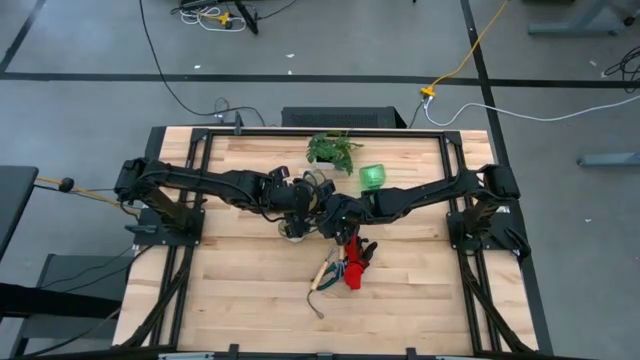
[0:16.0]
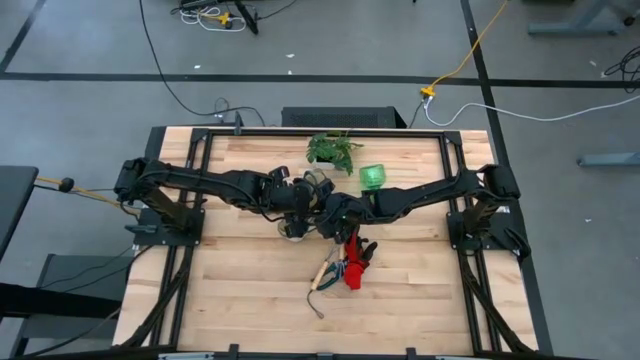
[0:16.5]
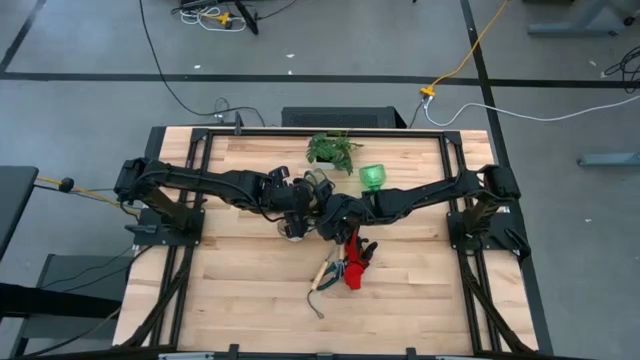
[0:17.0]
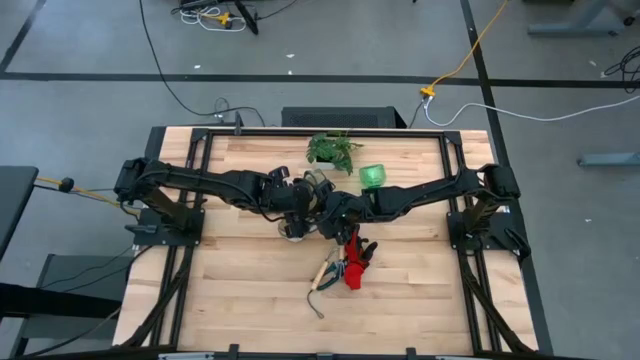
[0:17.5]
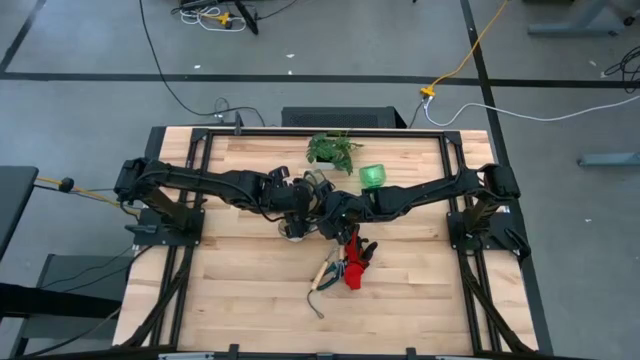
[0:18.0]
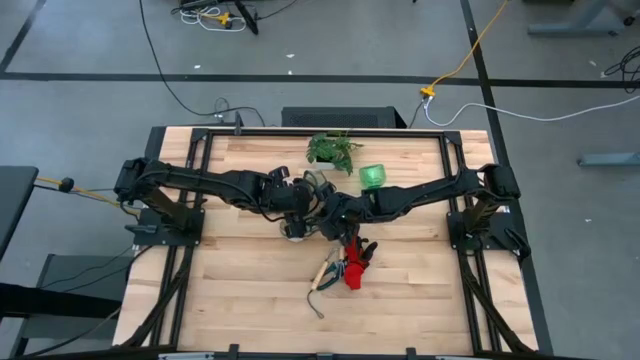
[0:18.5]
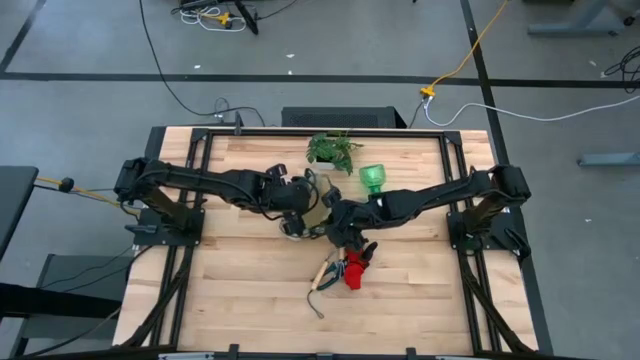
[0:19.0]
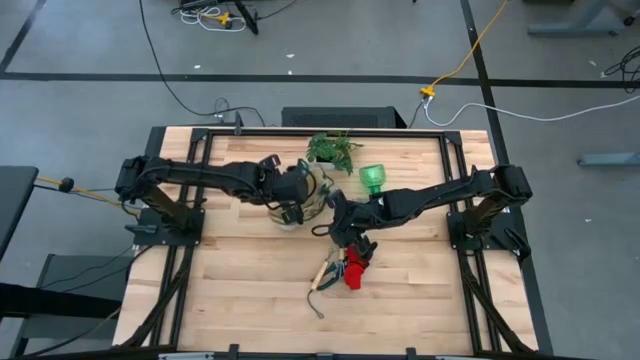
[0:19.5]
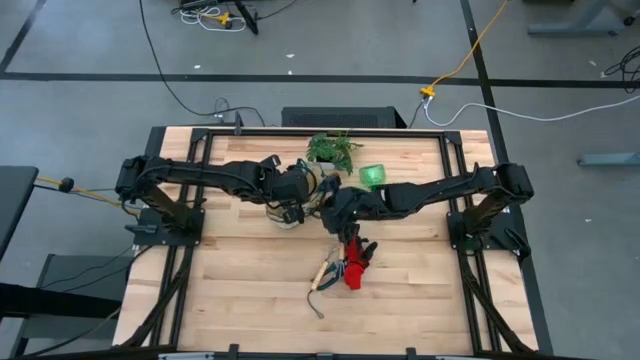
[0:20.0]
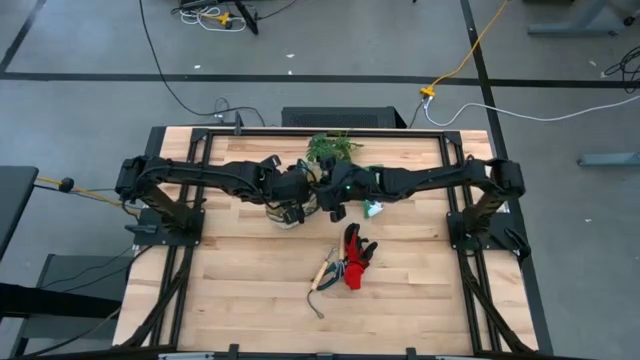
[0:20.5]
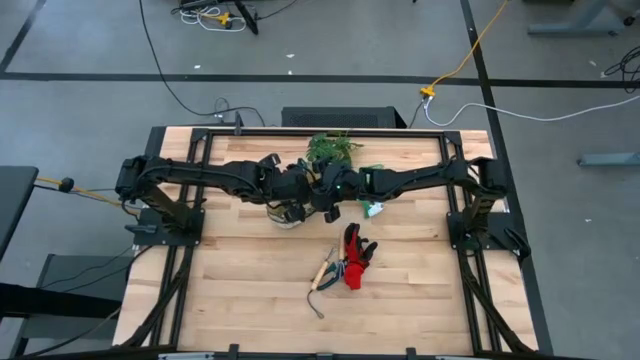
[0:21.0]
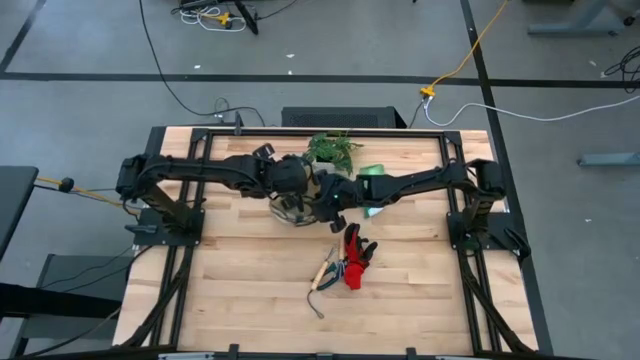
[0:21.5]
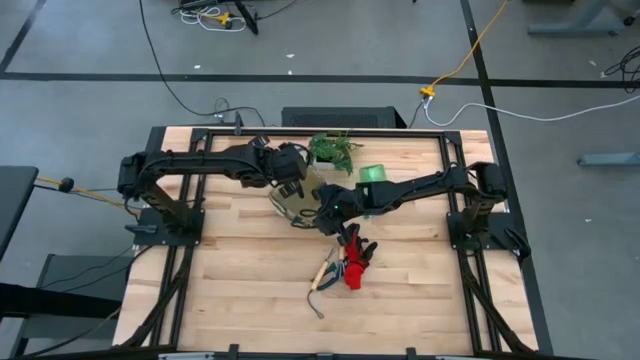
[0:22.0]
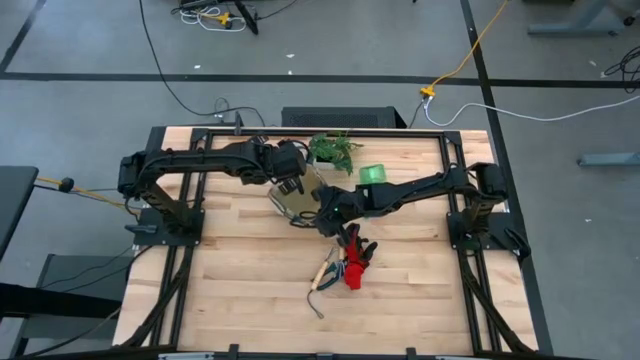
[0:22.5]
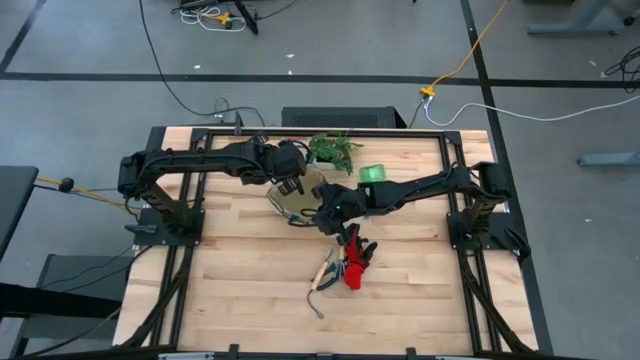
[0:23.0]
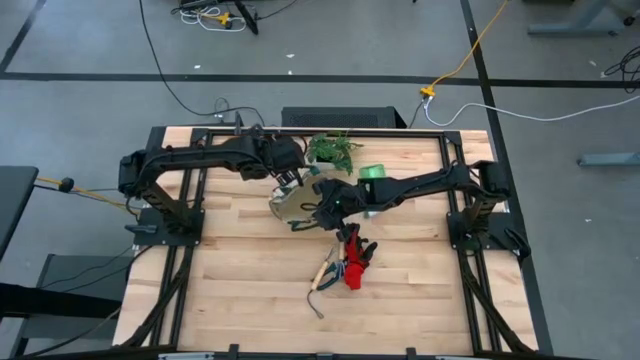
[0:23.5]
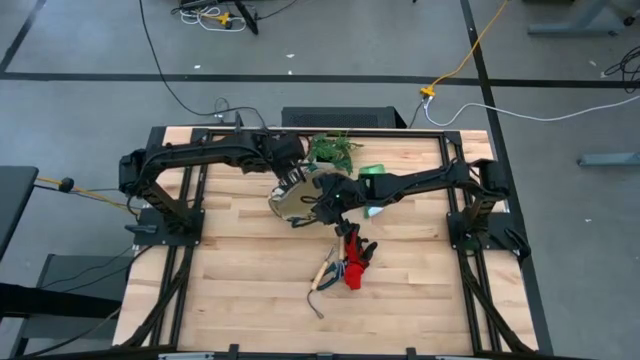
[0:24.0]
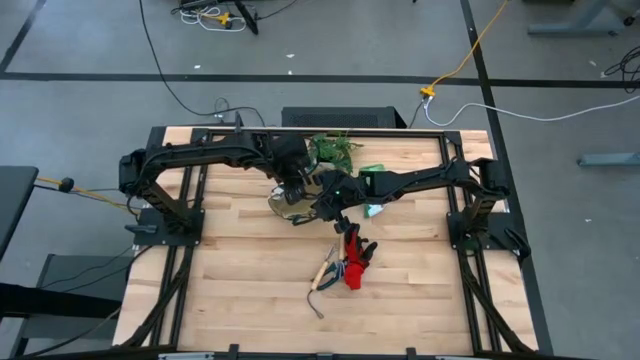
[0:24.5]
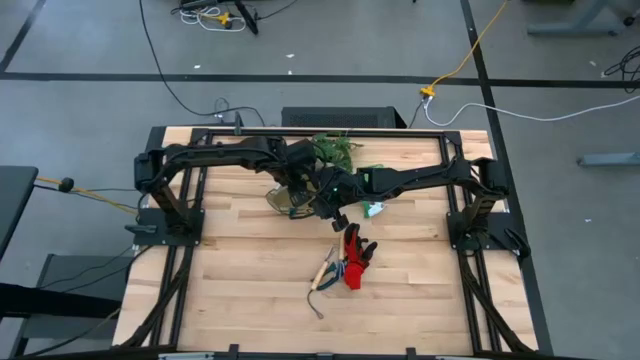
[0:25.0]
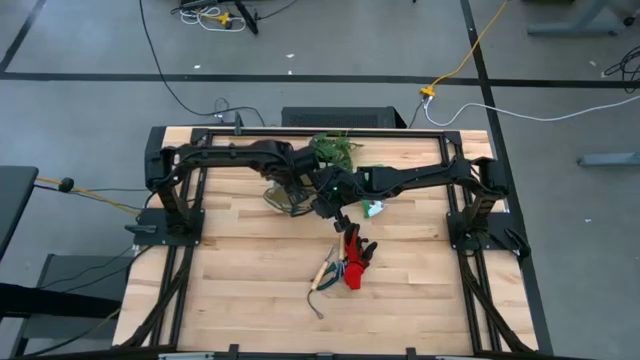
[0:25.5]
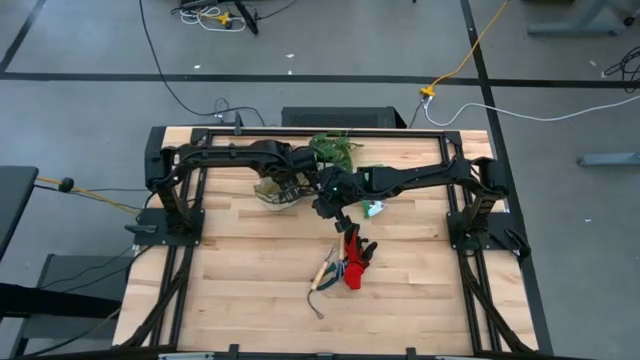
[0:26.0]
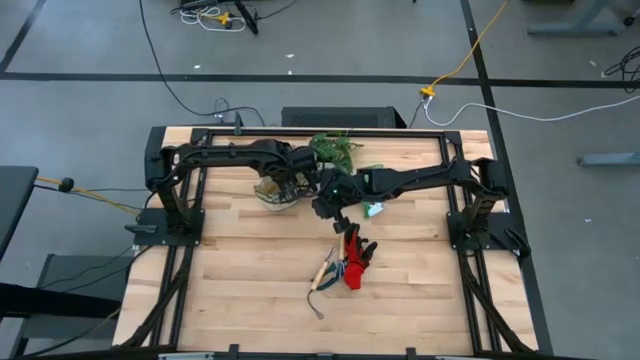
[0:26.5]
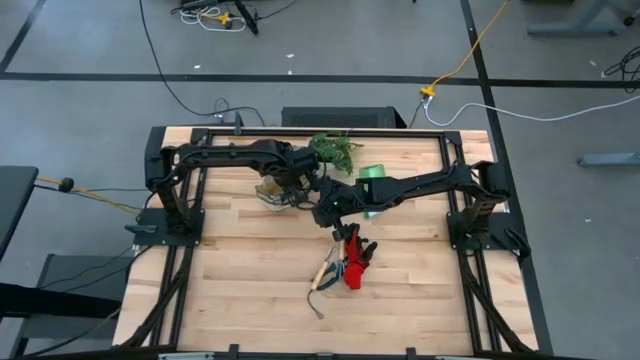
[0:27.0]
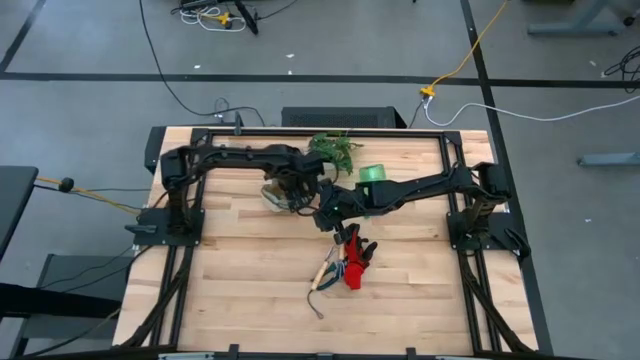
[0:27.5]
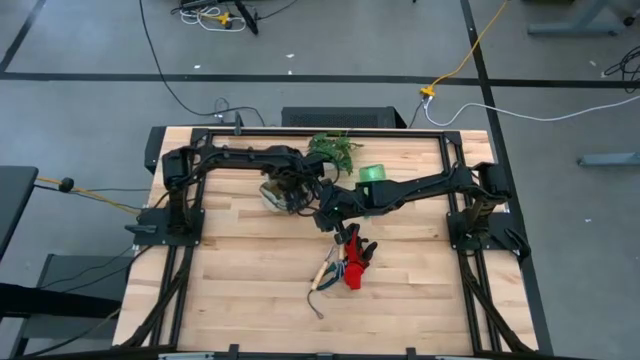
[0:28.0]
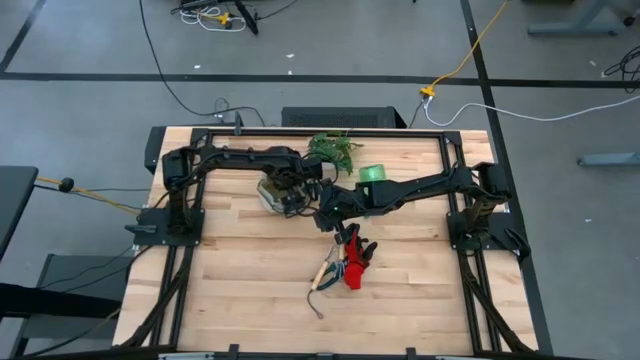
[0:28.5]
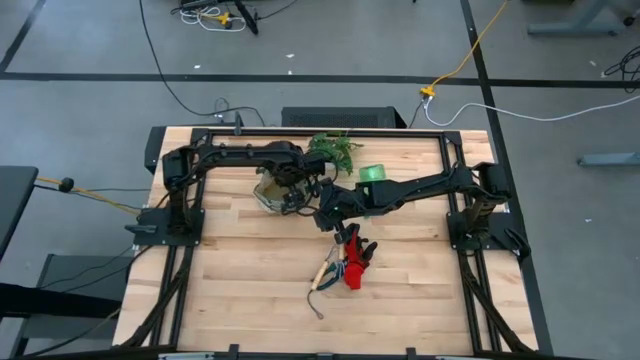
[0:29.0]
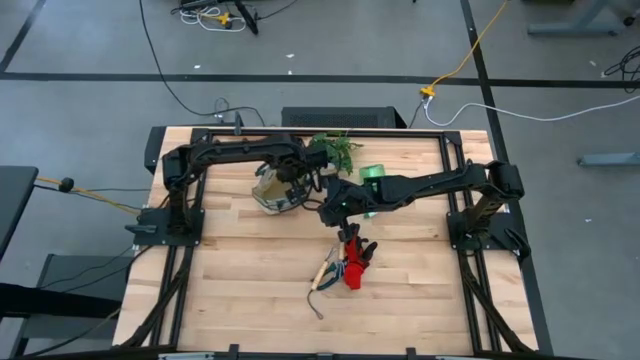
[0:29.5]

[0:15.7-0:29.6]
Task: Pick & Place Garden tools in Gardening bag
Prepare the white gardening bag

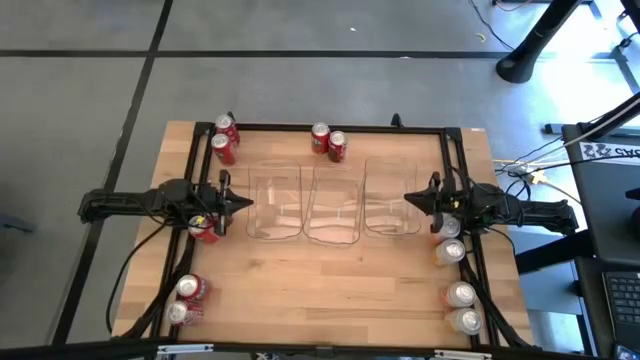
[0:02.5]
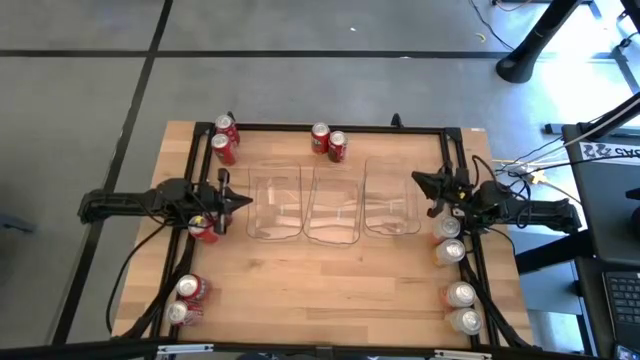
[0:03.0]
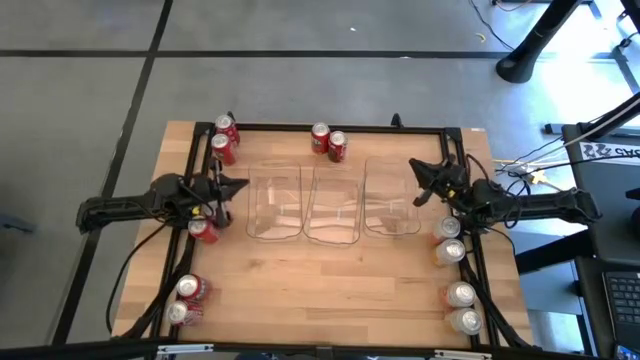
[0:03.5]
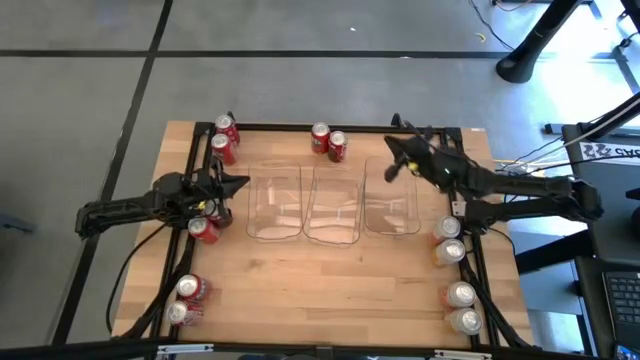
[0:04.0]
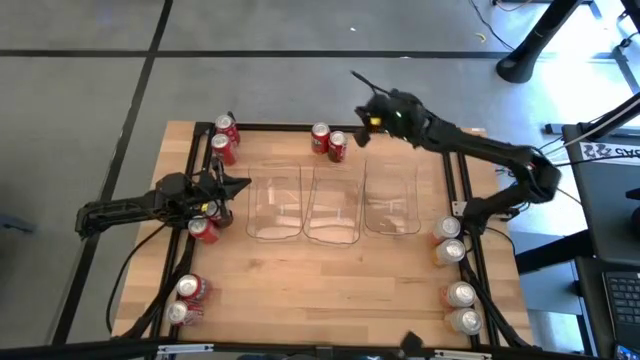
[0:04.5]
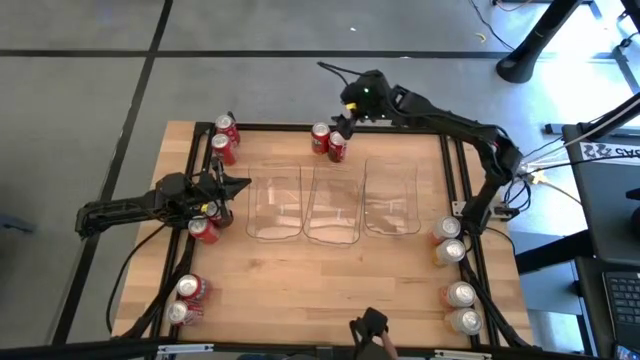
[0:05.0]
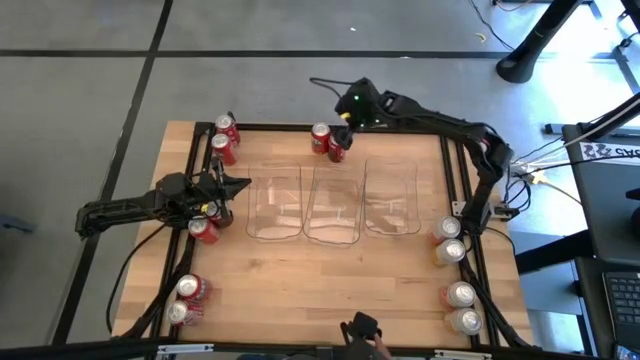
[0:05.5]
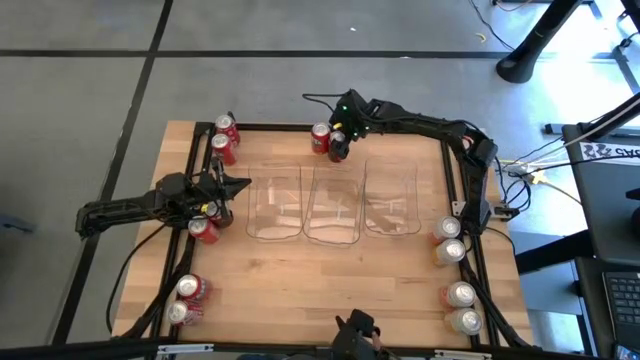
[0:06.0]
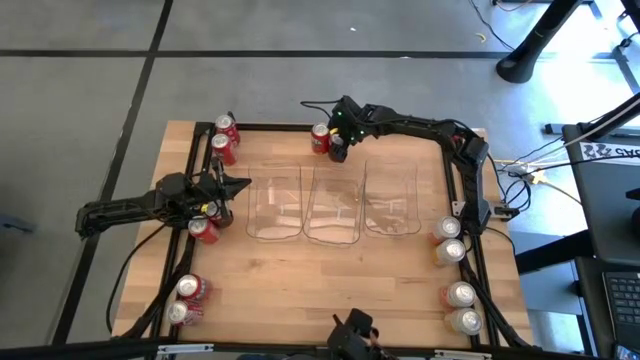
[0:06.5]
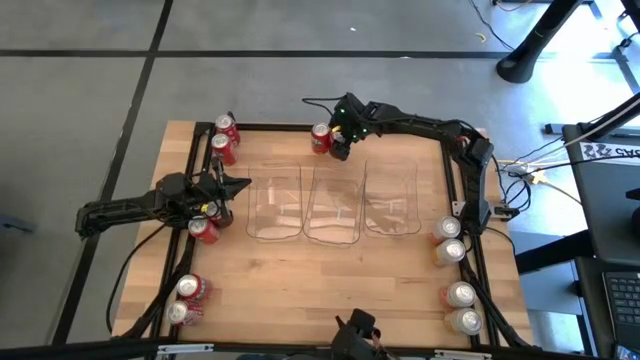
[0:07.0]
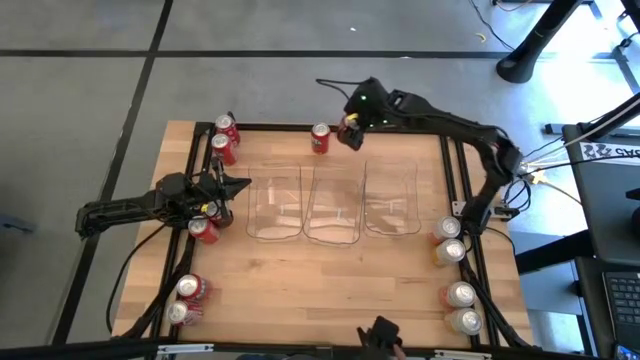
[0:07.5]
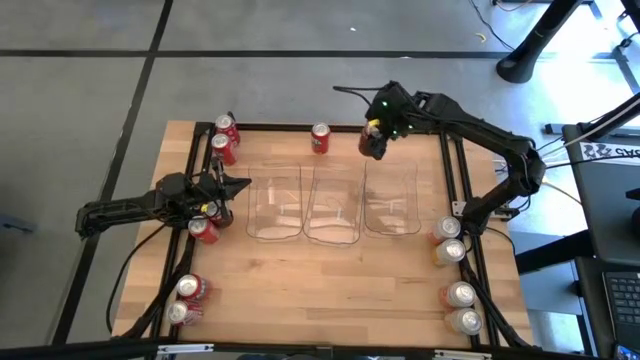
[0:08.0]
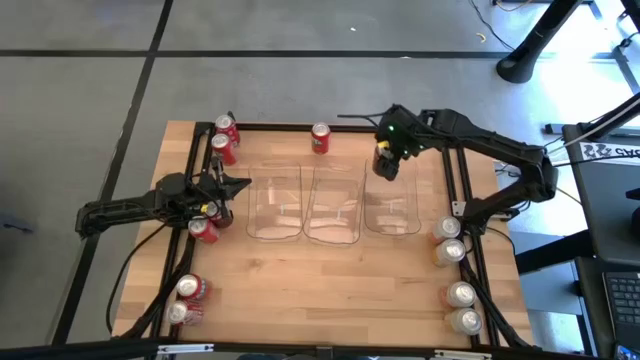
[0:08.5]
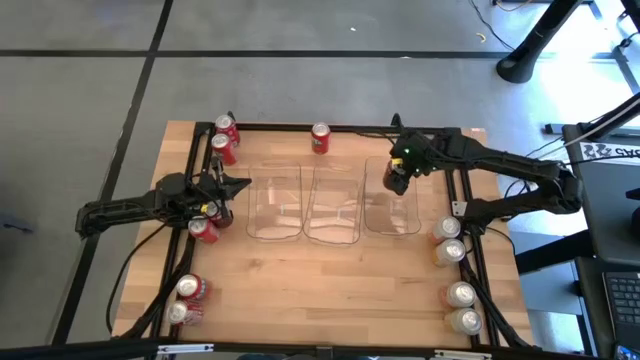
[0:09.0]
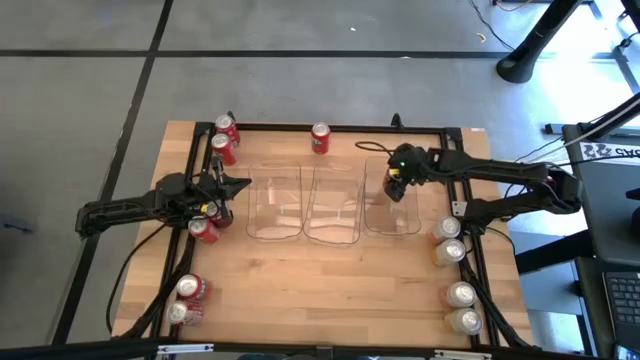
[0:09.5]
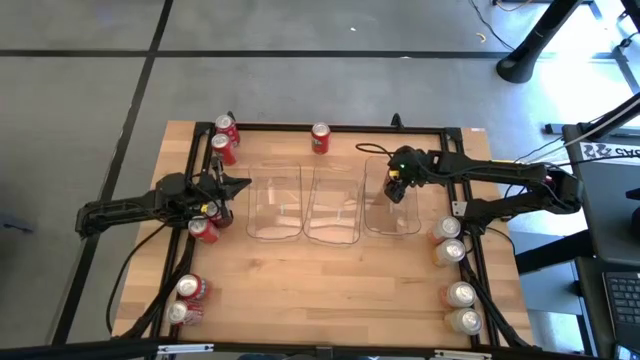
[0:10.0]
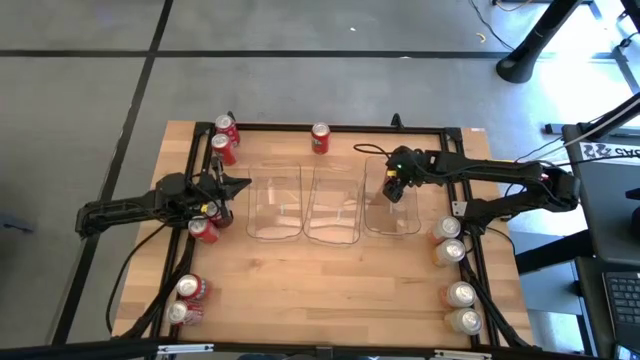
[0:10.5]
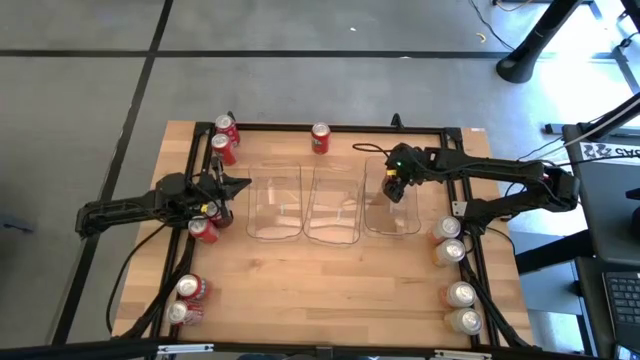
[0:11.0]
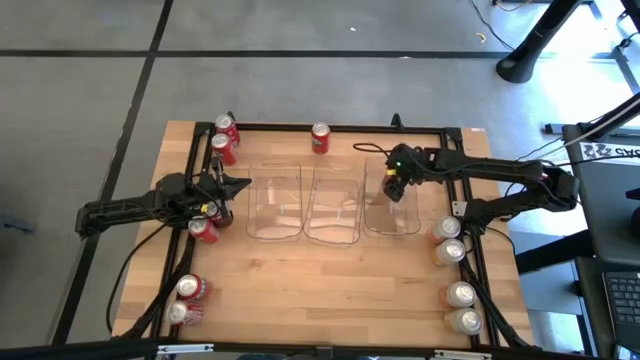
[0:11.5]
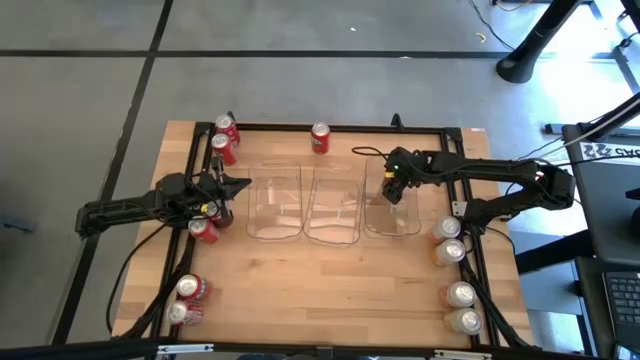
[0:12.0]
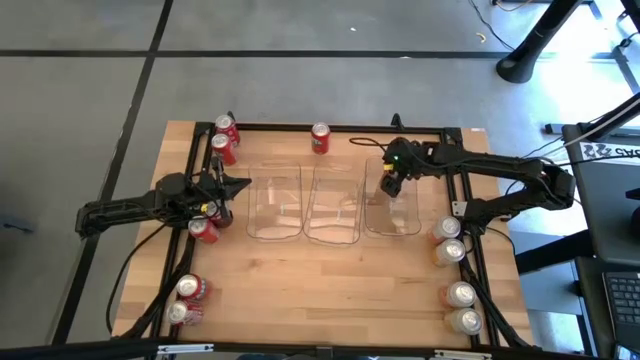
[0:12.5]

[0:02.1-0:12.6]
Task: Sort soda cans
Put the red soda can into the right transparent bin
